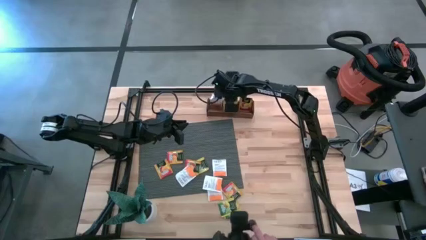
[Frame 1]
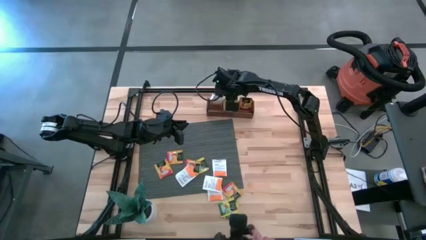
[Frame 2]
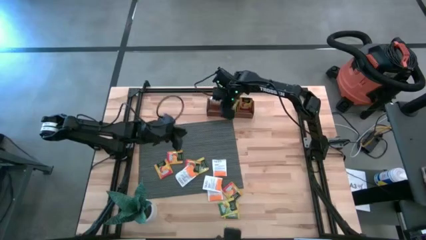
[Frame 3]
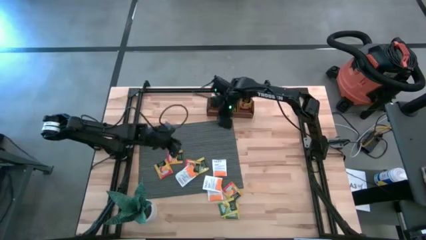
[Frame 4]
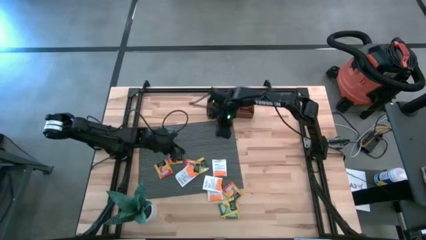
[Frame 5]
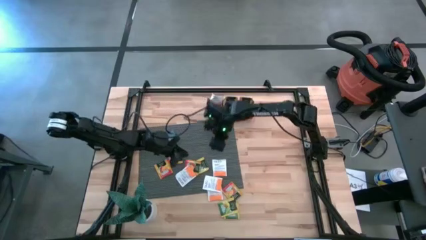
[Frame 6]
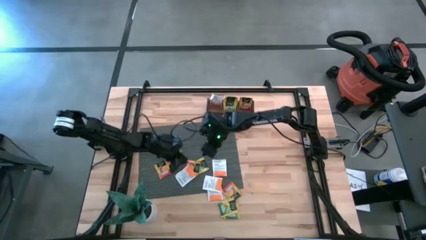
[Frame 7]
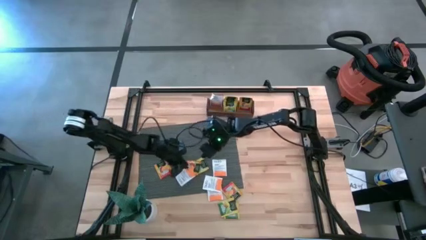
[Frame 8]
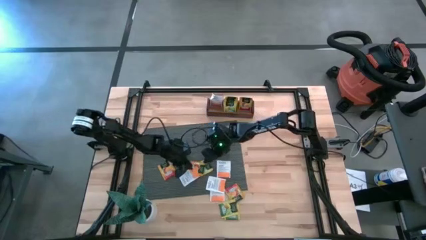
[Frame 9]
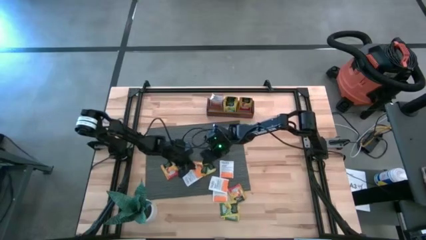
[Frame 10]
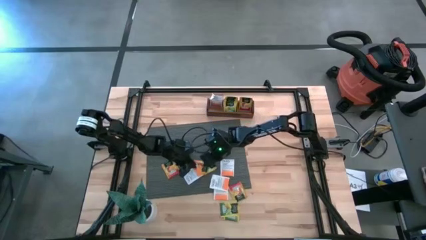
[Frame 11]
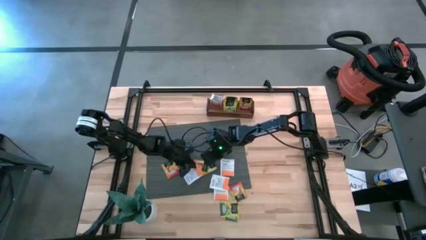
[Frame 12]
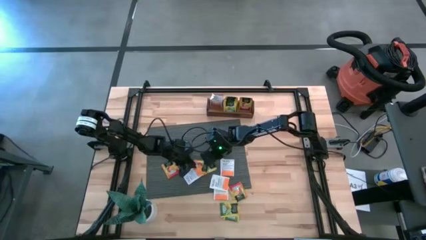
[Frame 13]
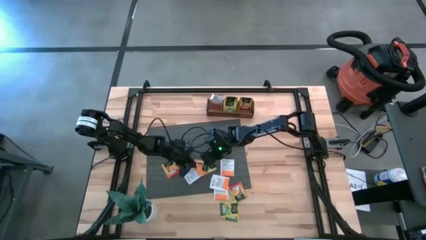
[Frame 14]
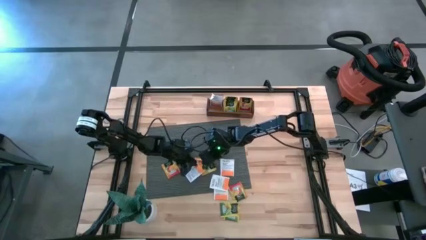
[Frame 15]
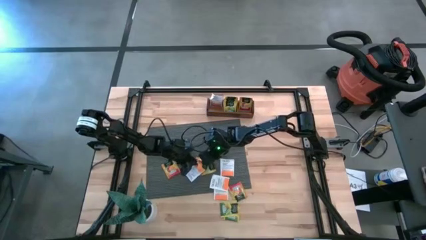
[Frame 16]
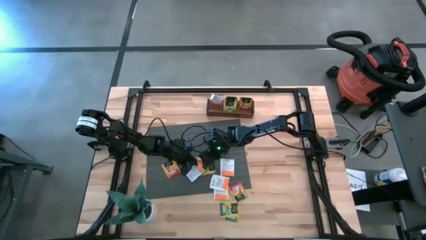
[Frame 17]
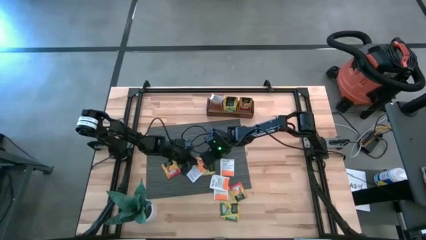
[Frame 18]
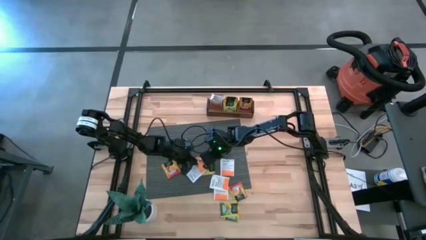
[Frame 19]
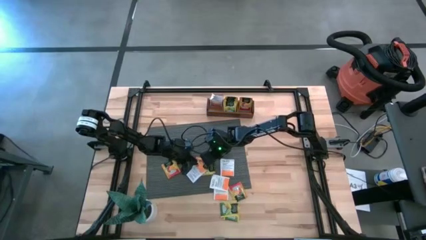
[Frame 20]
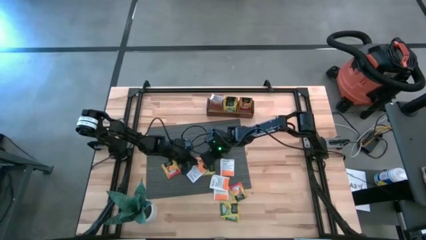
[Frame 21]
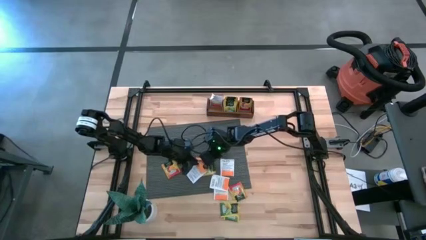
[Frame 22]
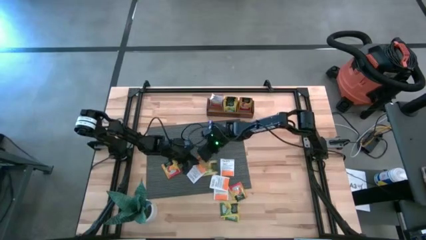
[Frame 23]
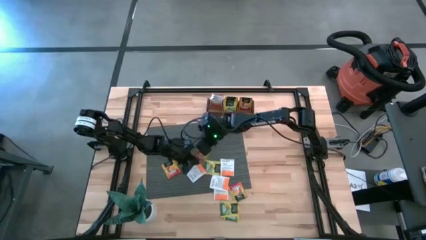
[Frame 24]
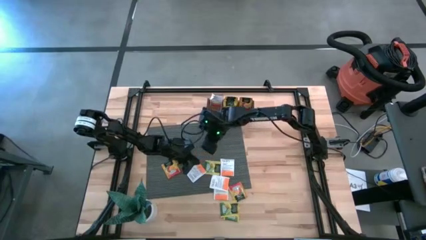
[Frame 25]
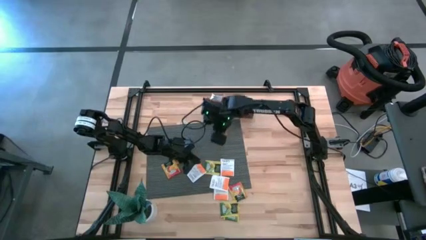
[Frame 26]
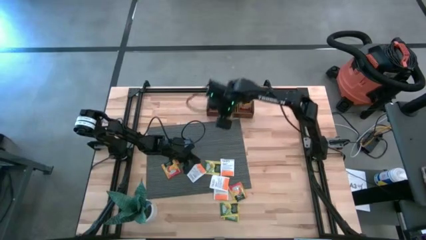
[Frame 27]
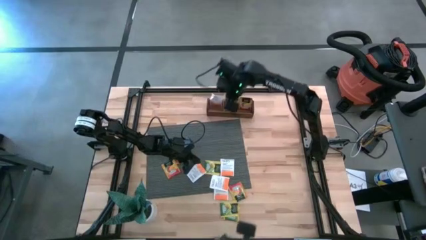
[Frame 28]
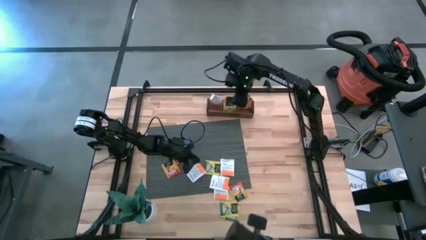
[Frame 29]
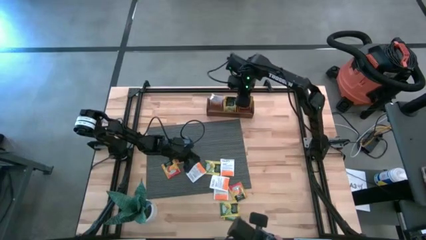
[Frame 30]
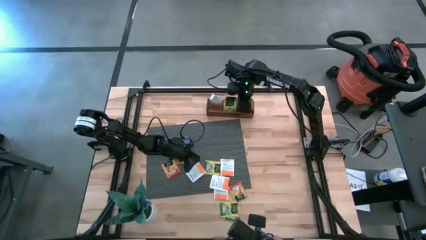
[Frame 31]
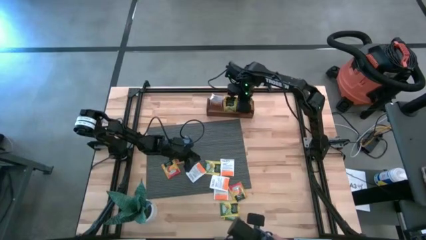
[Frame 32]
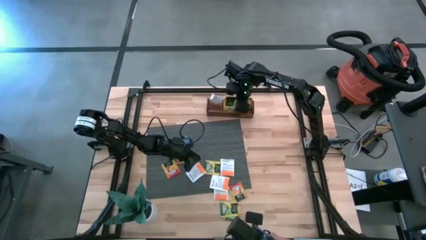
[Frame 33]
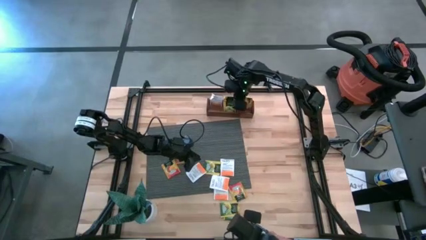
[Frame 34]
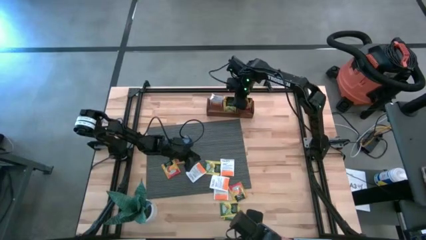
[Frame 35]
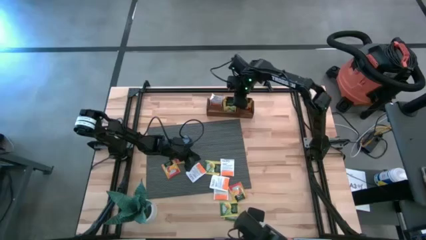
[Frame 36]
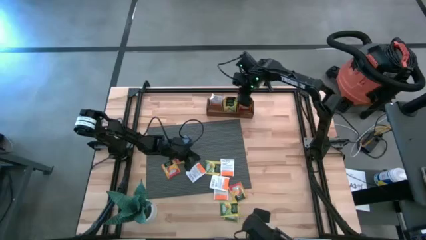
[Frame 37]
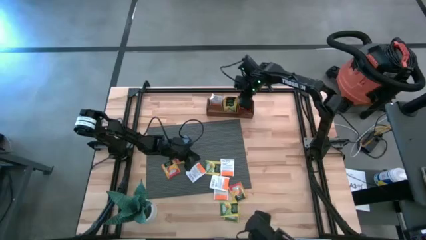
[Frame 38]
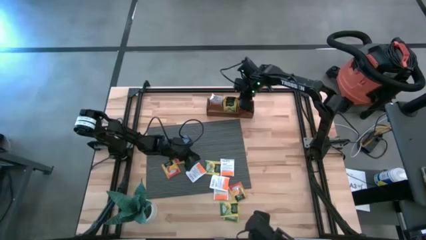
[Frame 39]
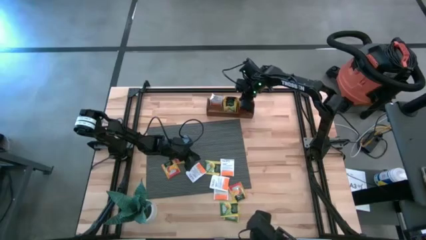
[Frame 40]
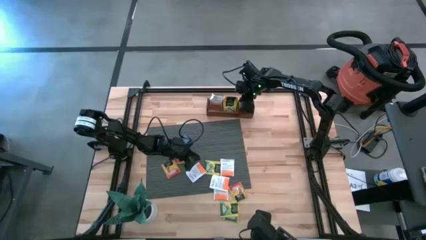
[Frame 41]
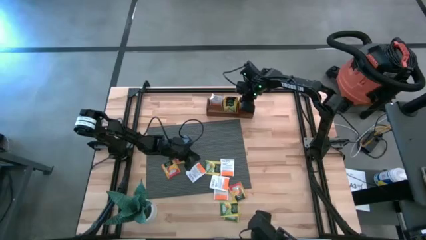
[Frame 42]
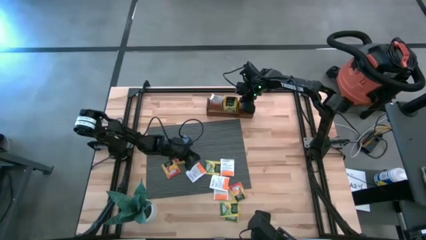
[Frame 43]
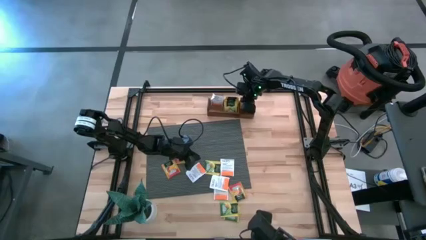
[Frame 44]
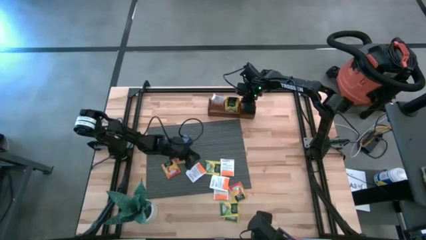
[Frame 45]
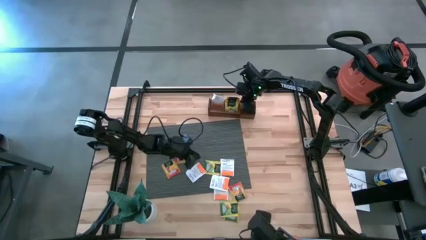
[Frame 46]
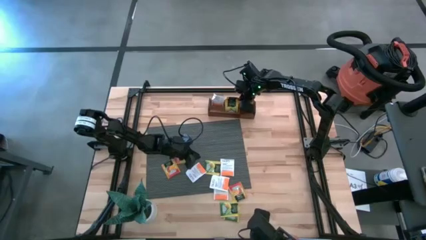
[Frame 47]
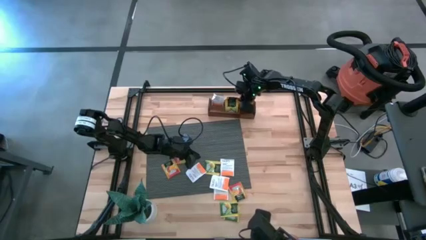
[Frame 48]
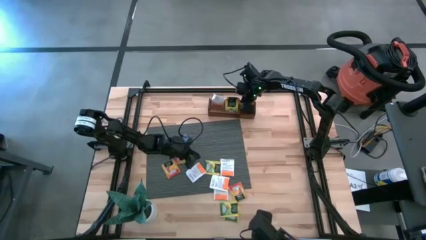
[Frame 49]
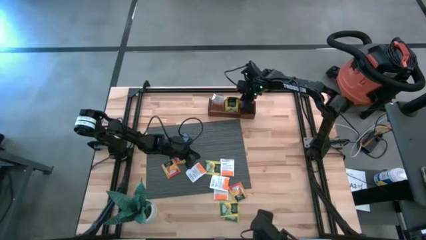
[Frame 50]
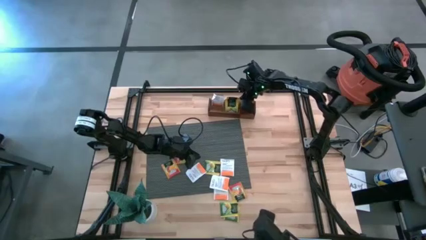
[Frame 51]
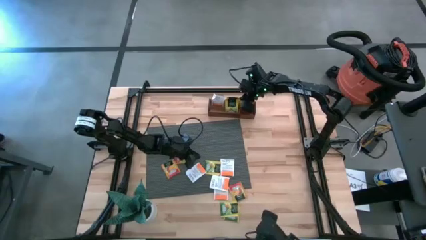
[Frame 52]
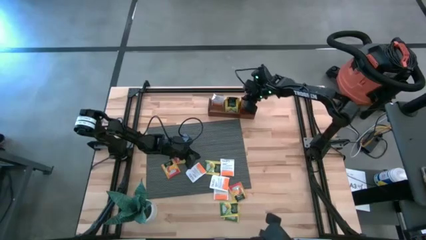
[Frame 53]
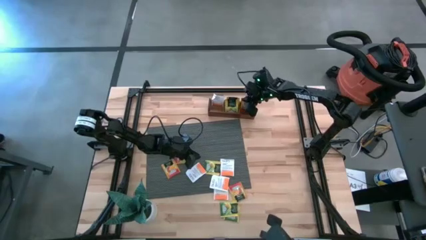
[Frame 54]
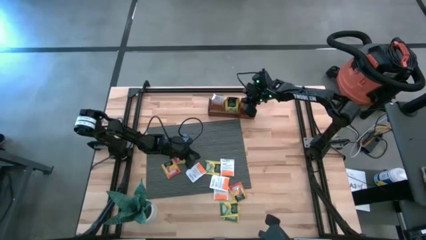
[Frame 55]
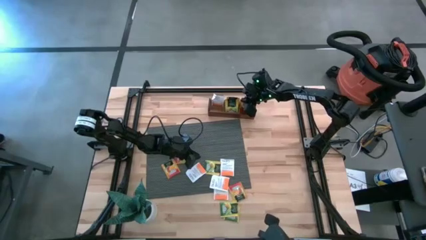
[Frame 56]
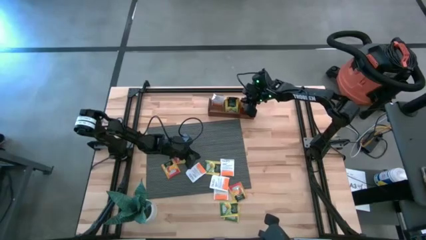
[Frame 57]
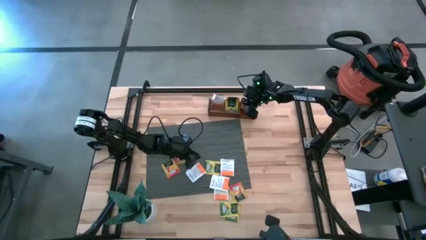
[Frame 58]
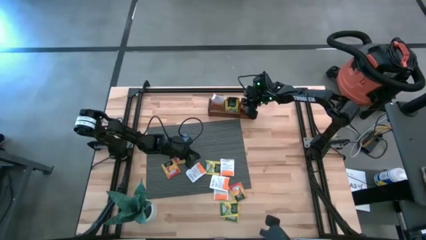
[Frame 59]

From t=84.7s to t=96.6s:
Task: Pick & Place Tea
Put the orange tea bag into the right section of the wooden organizer

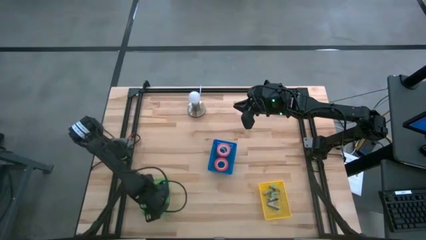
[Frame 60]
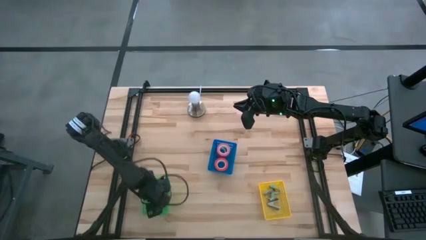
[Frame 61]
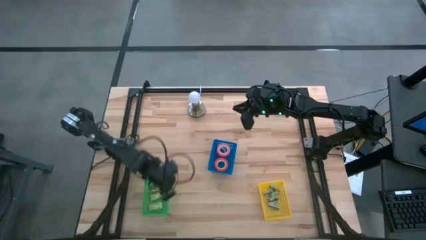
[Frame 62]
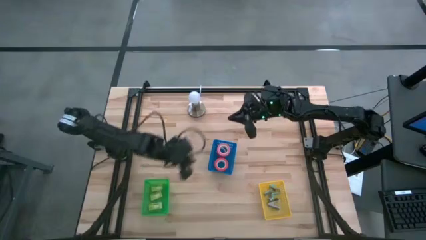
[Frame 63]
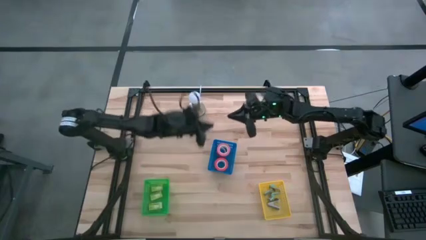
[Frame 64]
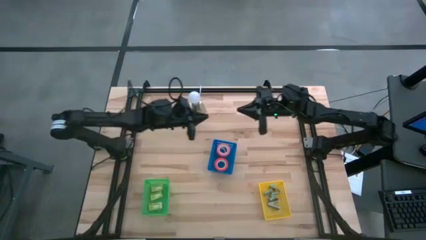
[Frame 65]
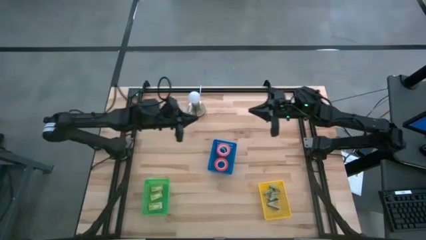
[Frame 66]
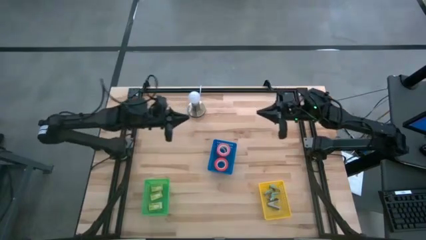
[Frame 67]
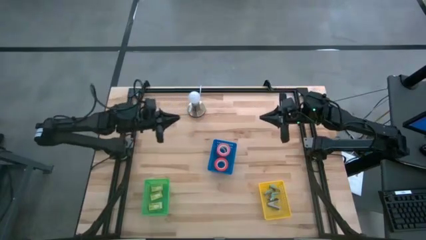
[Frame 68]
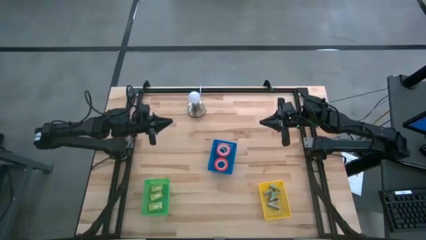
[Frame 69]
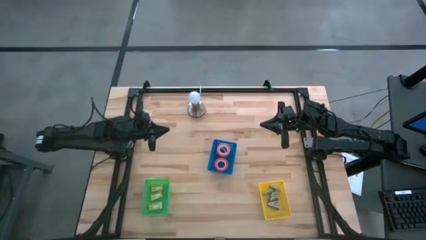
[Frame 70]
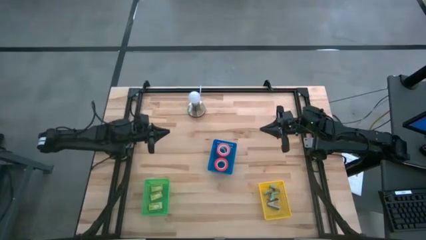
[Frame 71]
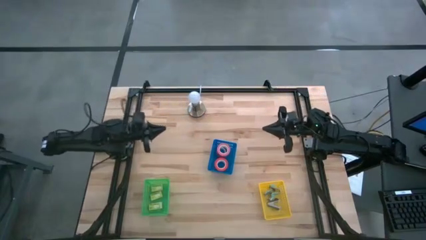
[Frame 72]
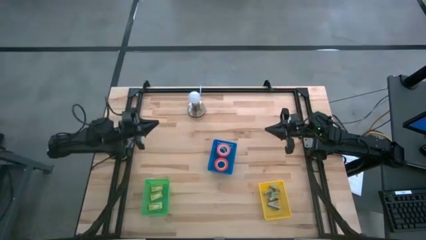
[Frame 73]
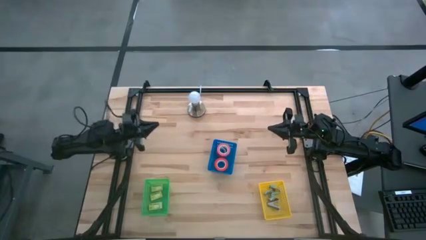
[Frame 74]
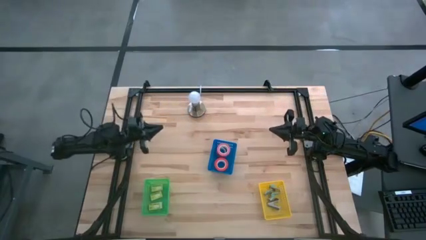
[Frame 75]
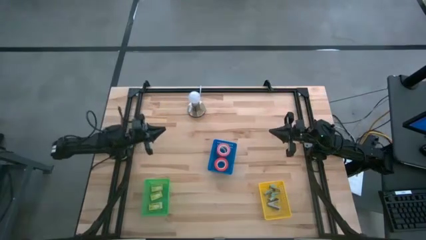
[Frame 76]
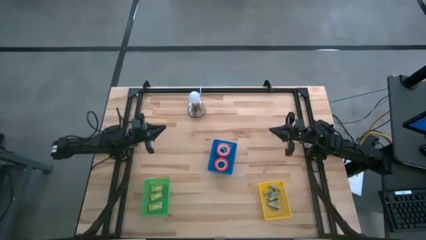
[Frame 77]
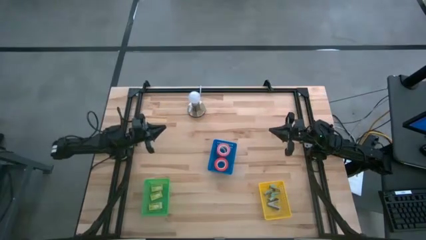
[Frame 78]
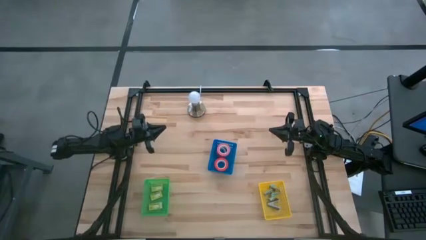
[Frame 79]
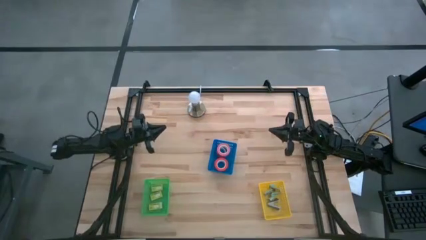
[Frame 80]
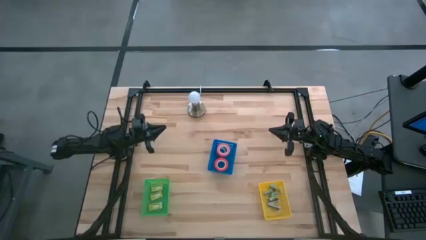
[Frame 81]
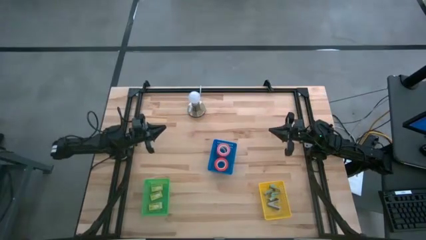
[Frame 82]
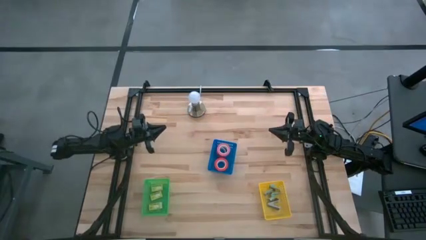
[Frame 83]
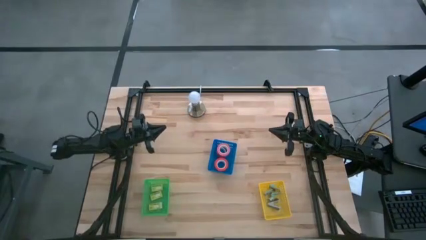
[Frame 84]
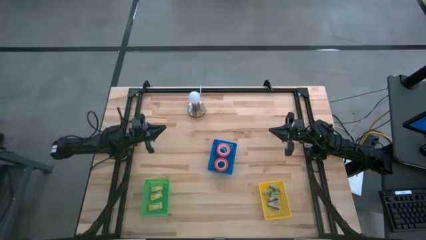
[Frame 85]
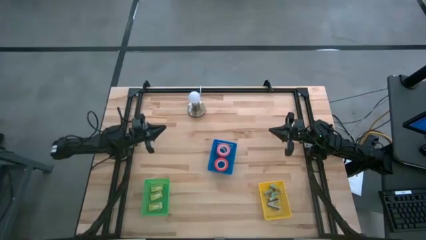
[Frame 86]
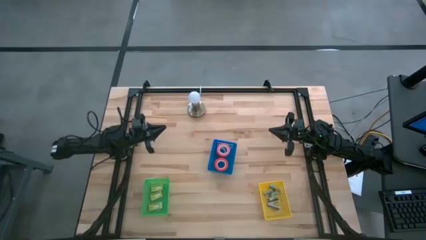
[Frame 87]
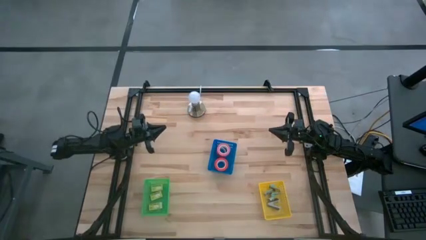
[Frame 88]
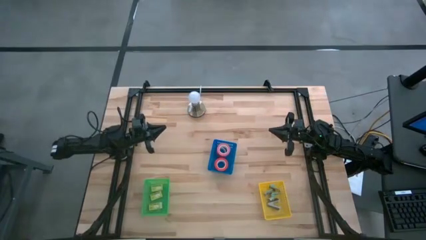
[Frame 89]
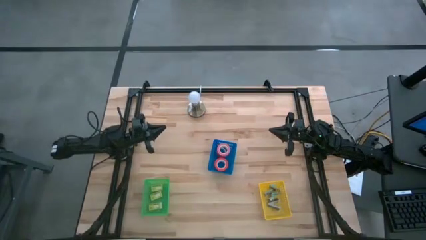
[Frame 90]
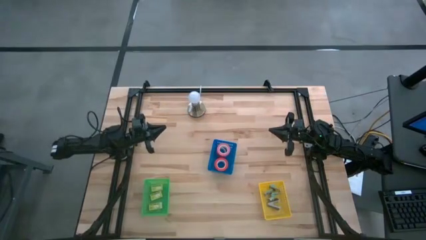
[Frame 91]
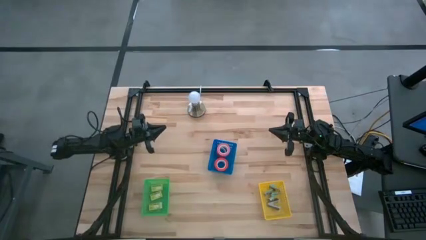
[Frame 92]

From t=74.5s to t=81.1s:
Task: Pick and place Stapler, Stapler remover, tape
Return to Home Position
